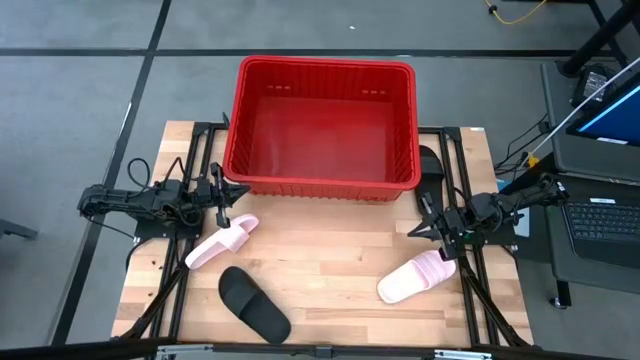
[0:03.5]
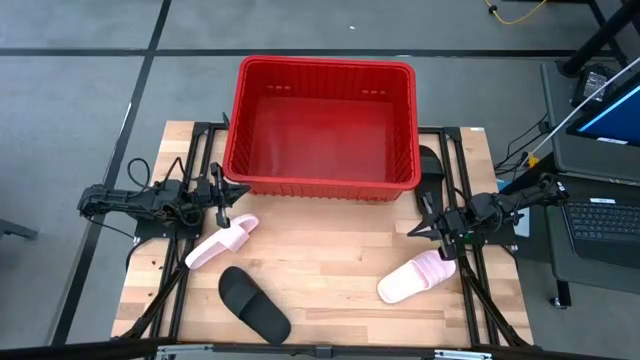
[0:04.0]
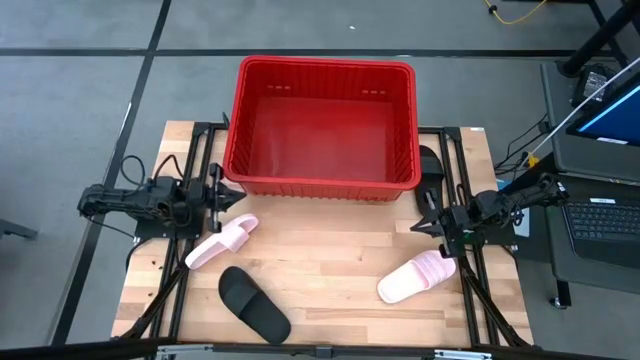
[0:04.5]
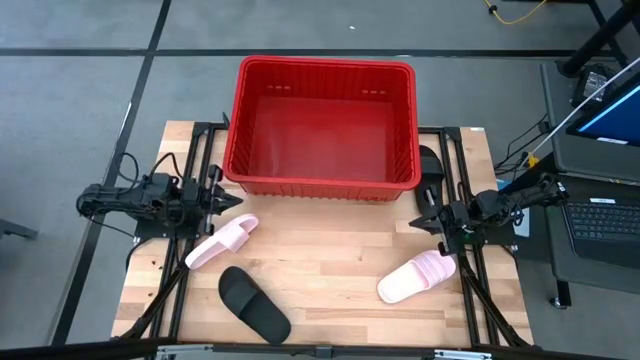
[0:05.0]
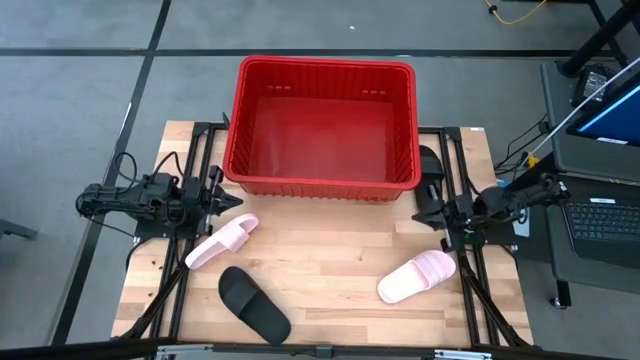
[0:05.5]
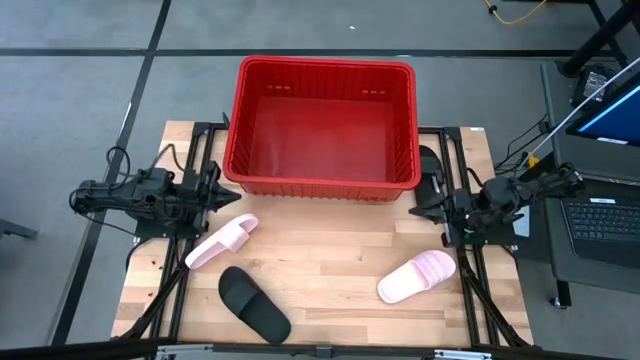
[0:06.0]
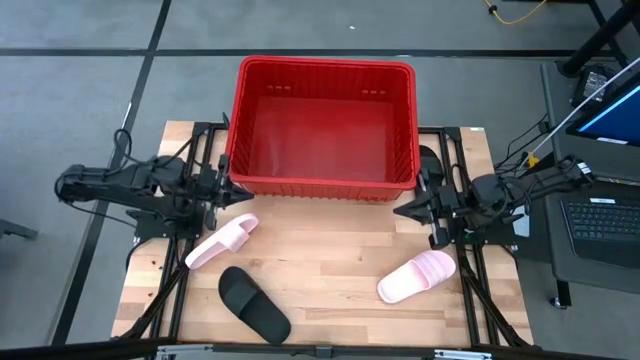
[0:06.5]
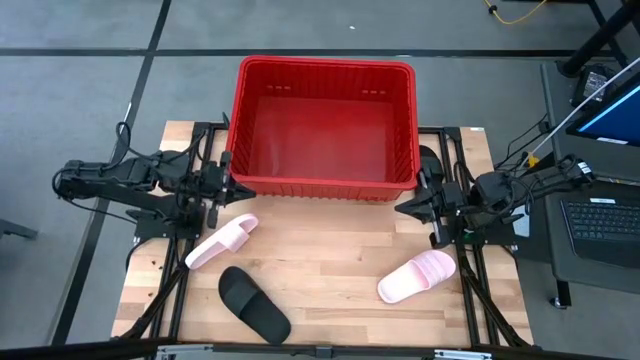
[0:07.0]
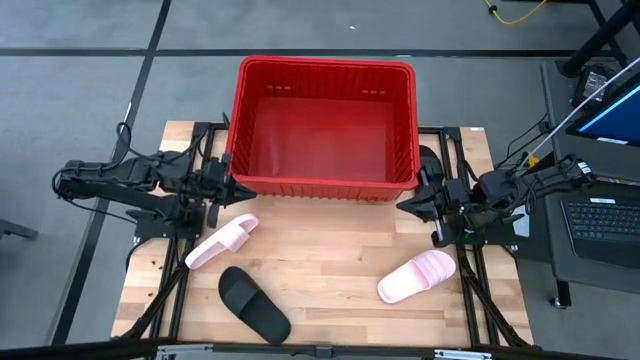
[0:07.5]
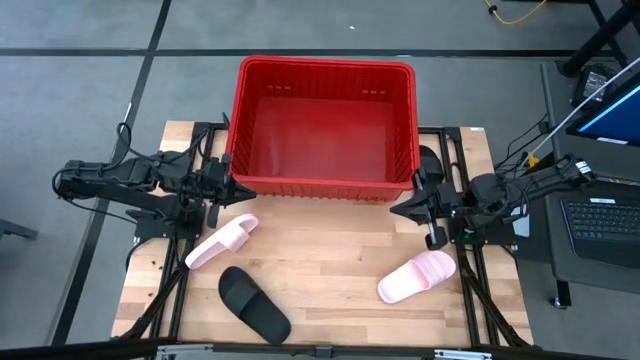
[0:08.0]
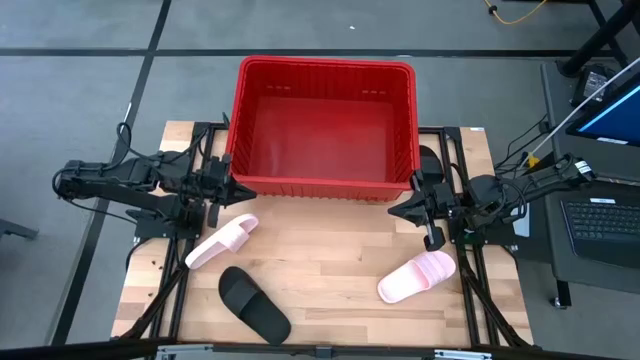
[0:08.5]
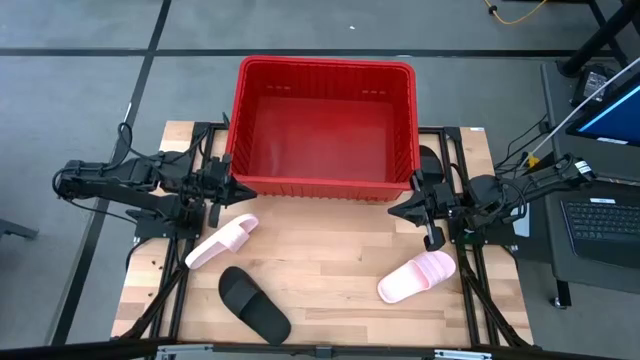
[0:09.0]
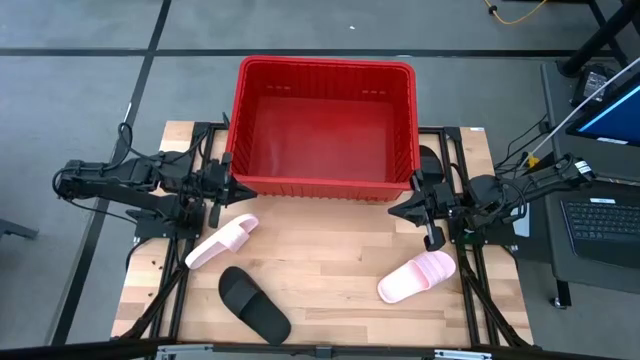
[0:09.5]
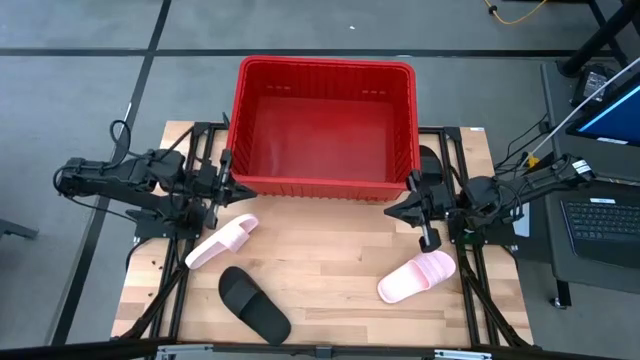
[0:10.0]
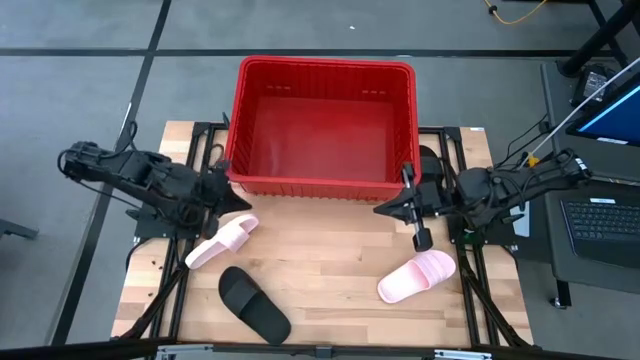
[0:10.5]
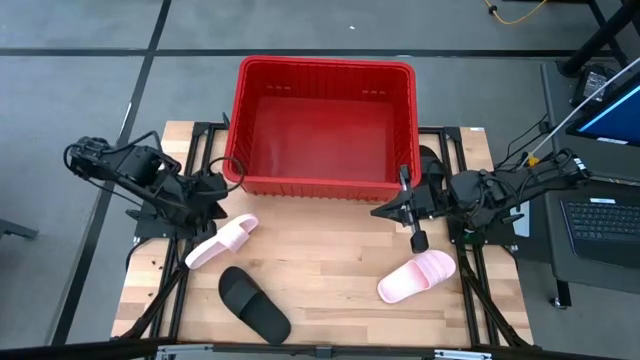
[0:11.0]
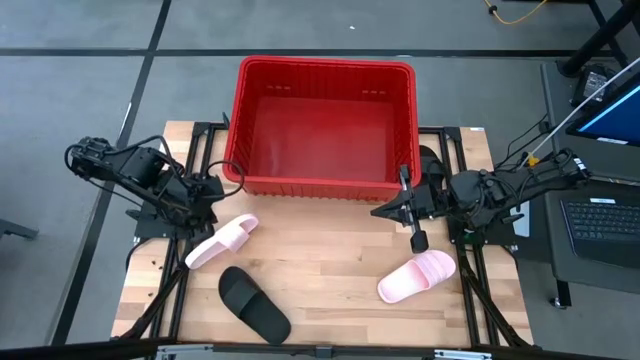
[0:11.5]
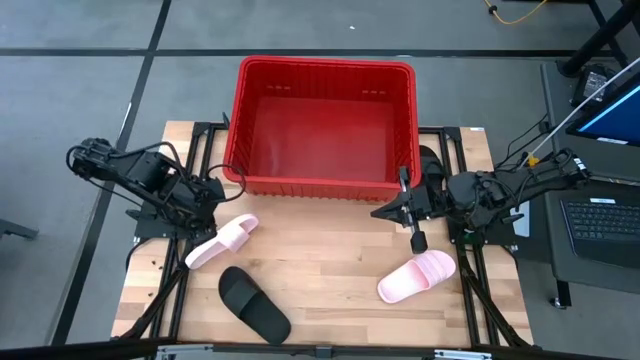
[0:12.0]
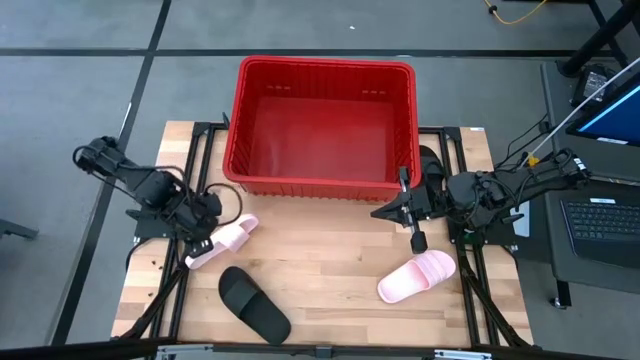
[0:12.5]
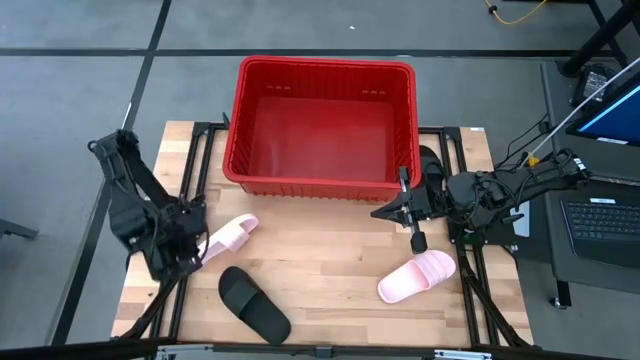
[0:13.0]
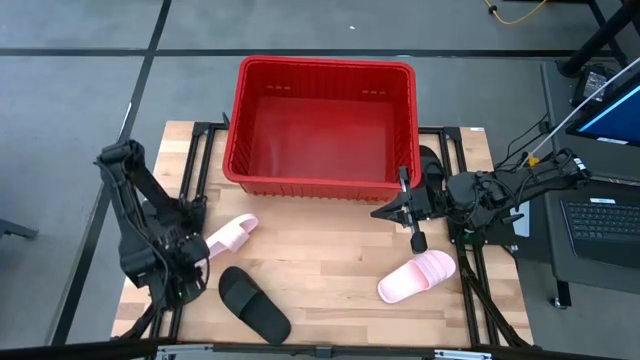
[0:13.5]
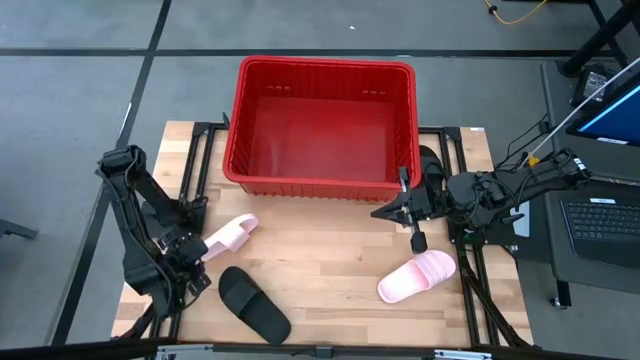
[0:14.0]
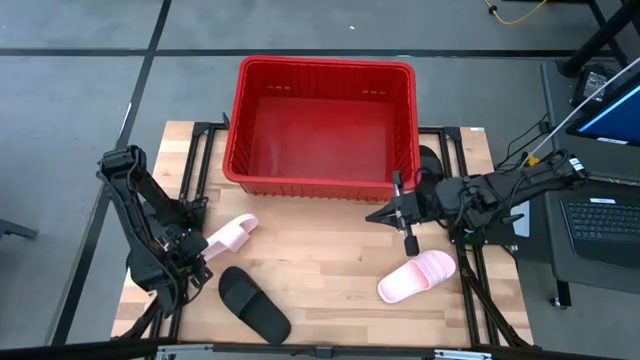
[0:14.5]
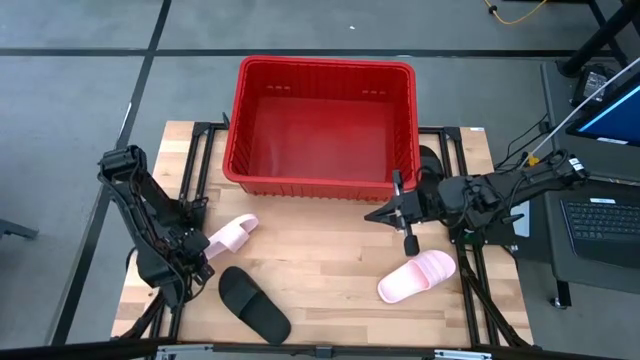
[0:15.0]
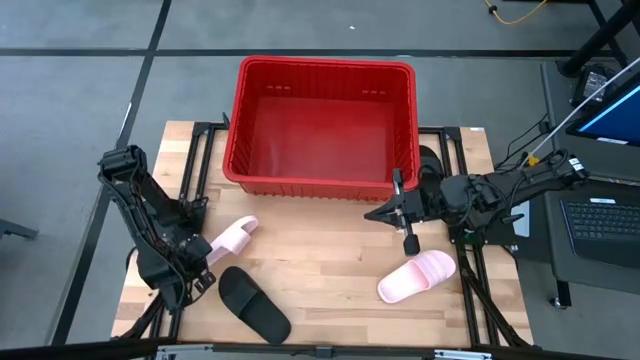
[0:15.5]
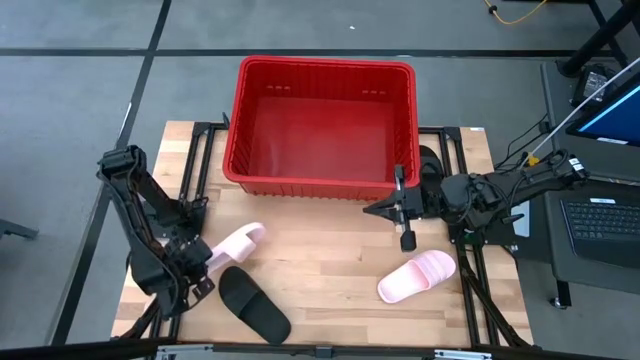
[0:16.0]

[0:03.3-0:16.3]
Task: Pick and place slides into bin
Put the left pink slide into the bin

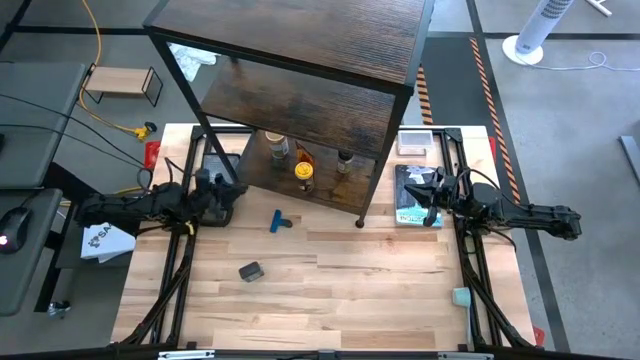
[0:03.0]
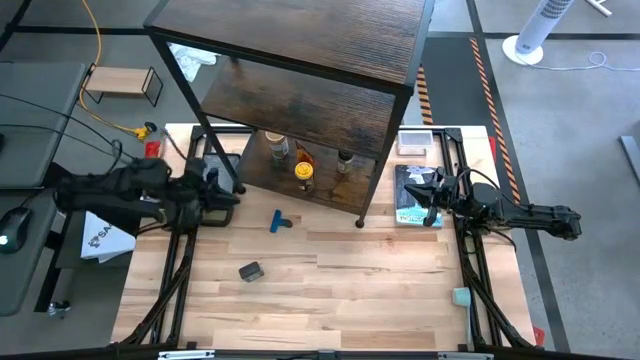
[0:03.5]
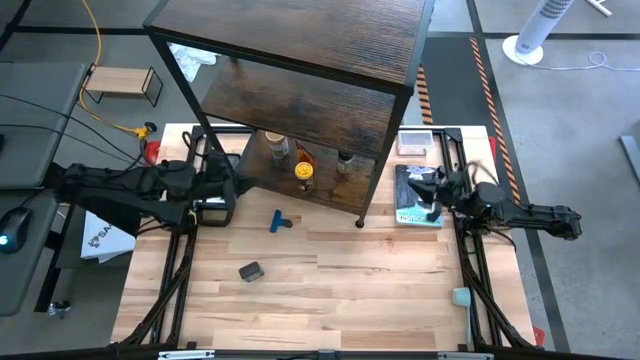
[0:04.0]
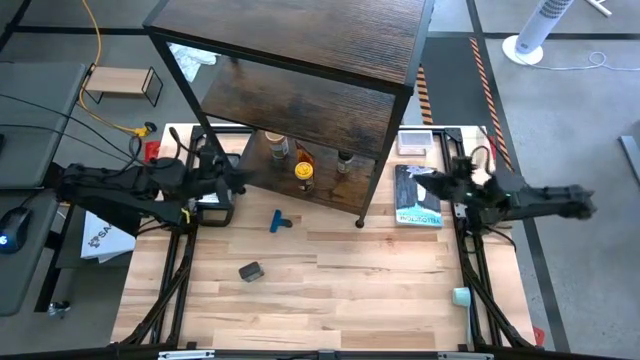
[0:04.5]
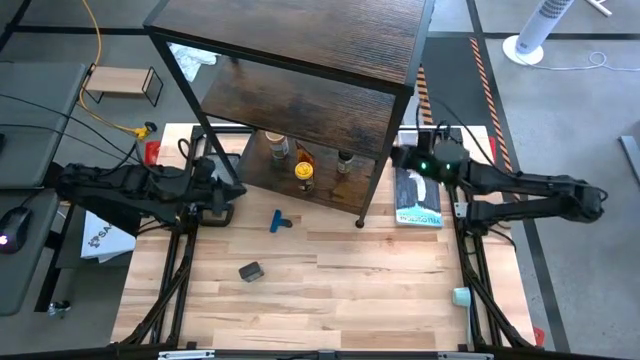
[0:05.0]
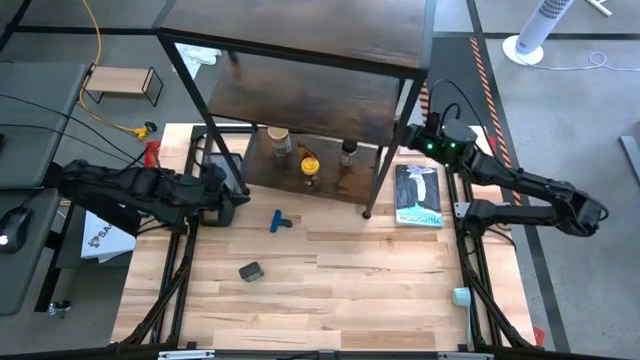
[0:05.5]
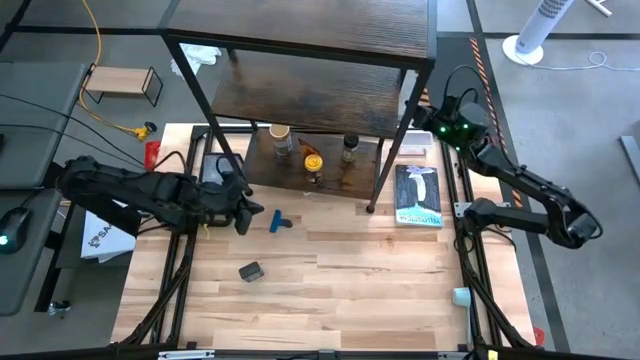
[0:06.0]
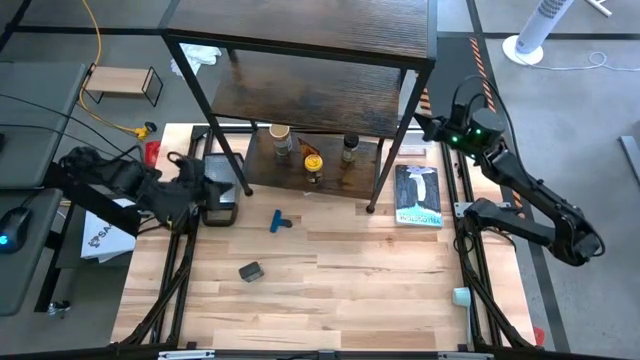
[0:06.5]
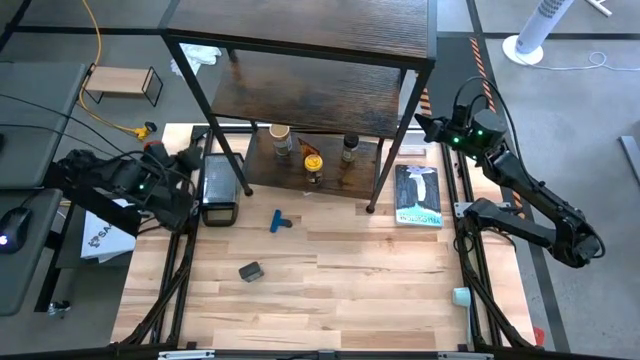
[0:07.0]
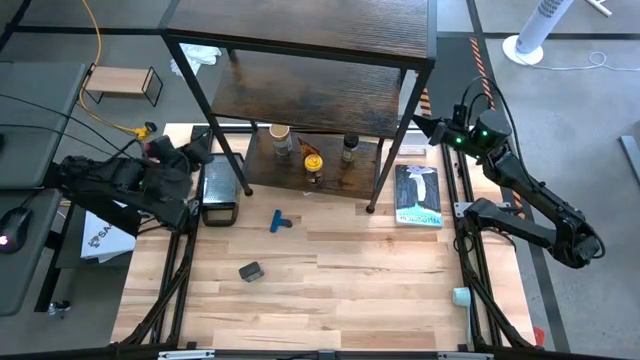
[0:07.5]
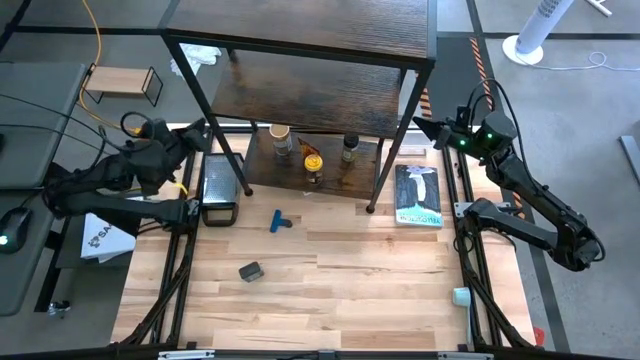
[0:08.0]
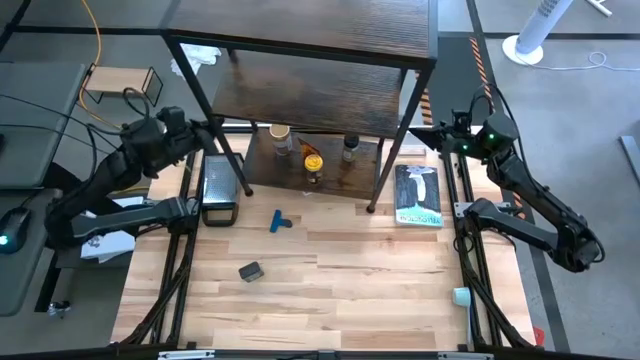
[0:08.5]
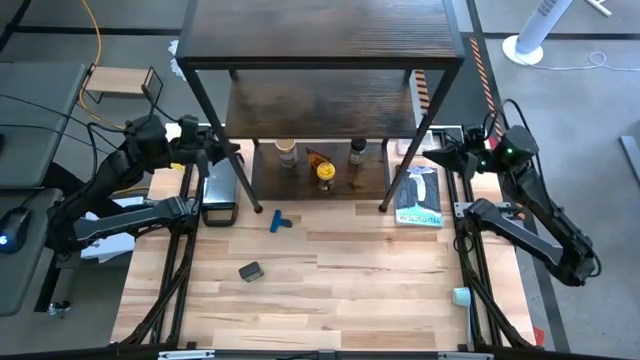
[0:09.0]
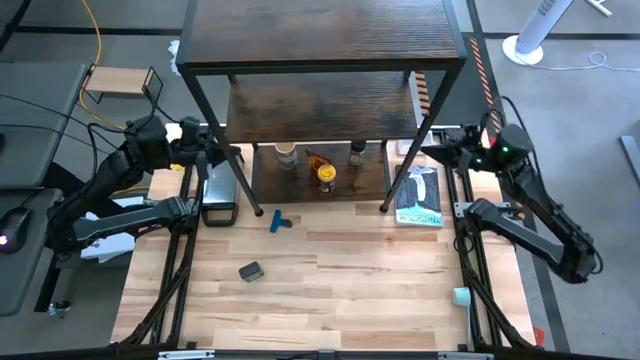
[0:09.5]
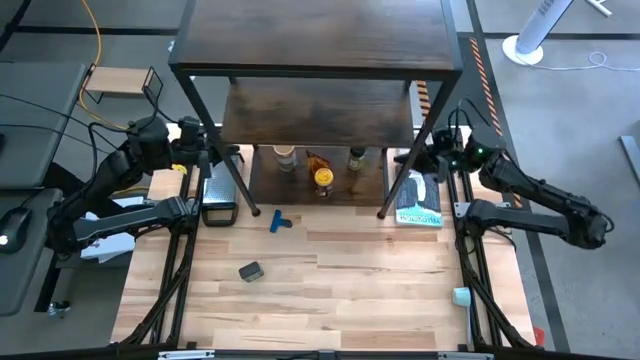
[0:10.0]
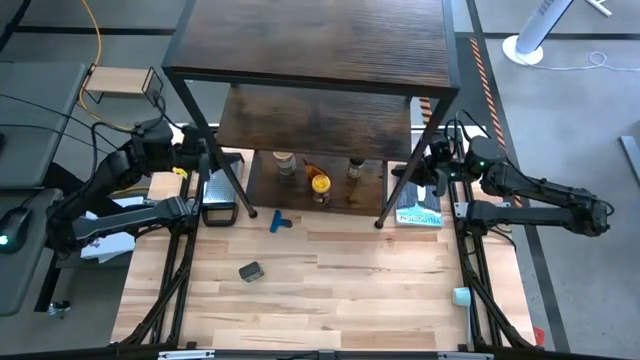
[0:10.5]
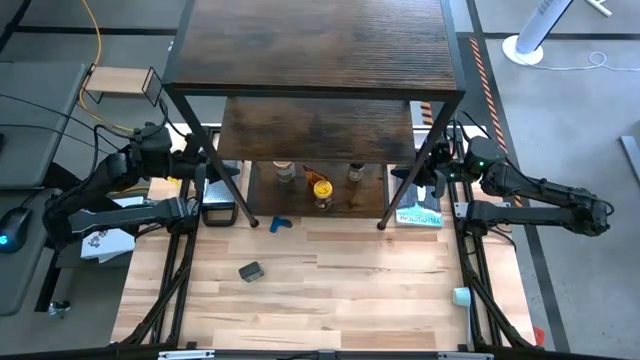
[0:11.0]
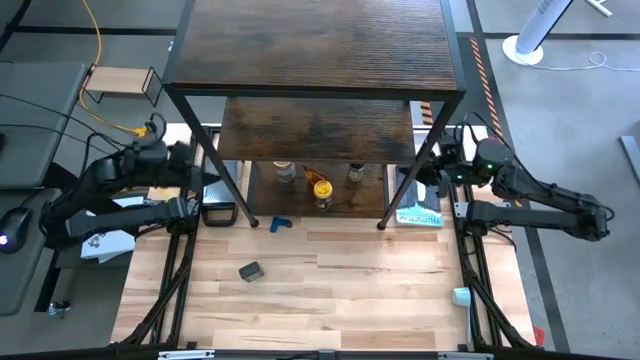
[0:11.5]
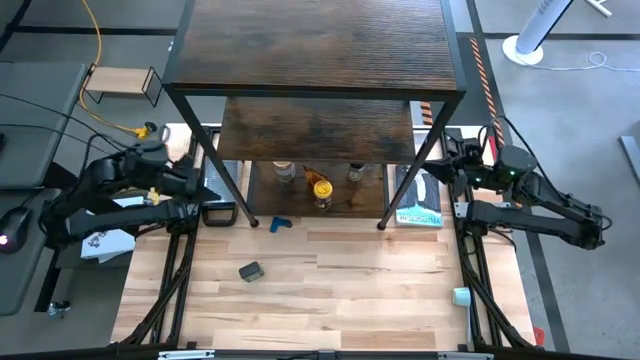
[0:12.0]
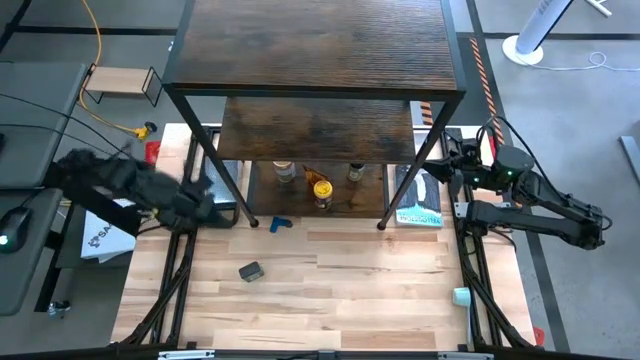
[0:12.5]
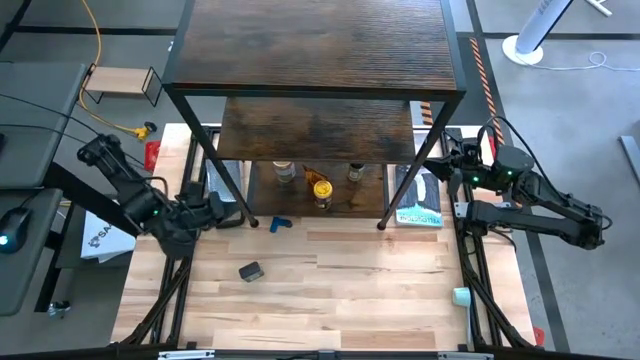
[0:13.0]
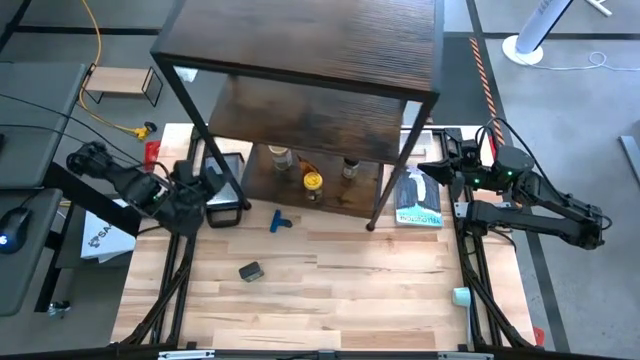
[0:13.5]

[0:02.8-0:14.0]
Task: Shelf spices
Adjust the shelf
